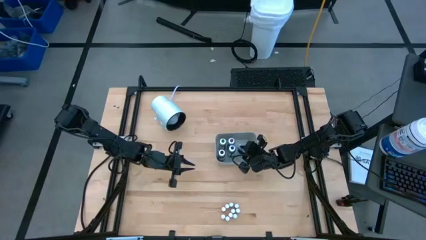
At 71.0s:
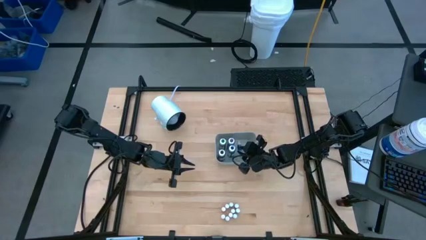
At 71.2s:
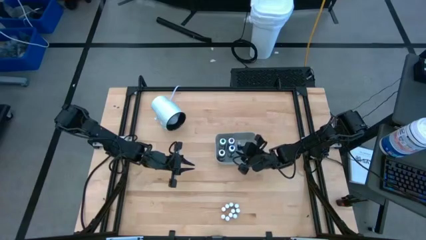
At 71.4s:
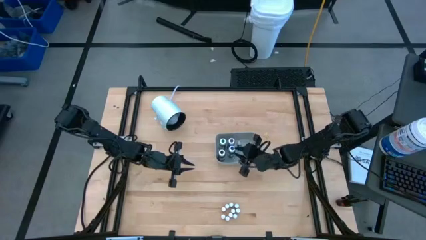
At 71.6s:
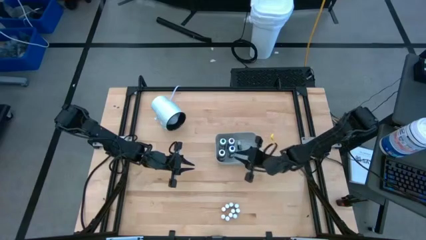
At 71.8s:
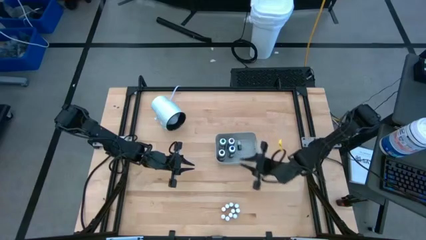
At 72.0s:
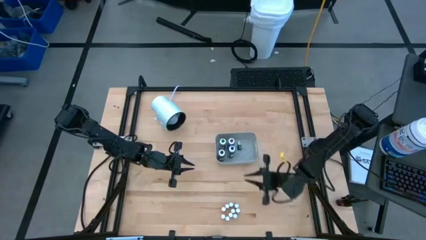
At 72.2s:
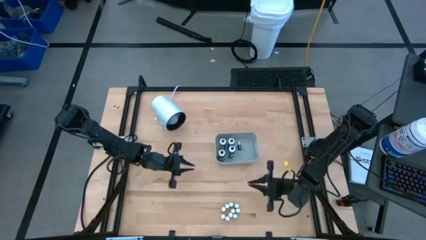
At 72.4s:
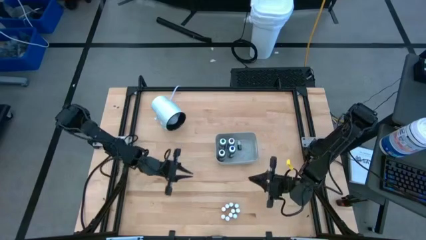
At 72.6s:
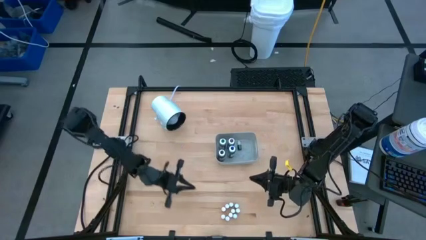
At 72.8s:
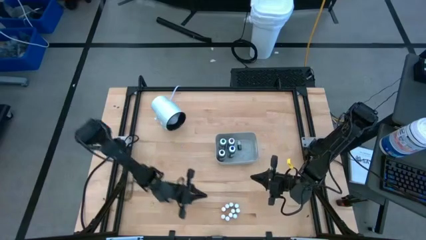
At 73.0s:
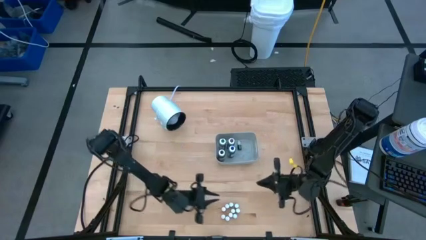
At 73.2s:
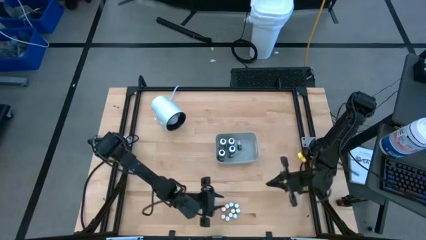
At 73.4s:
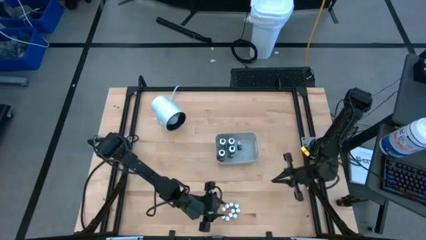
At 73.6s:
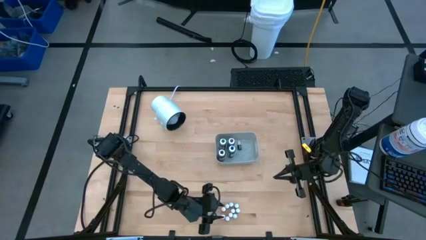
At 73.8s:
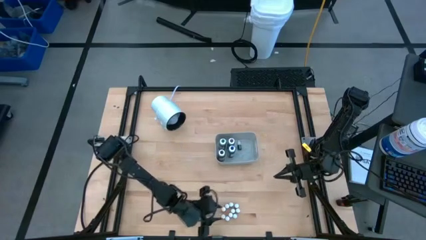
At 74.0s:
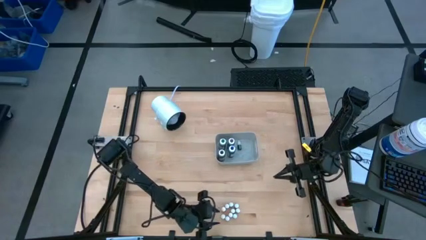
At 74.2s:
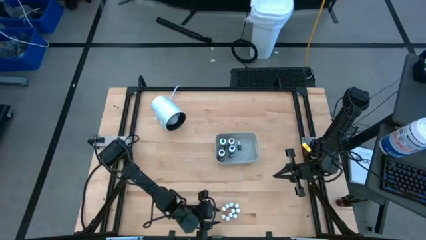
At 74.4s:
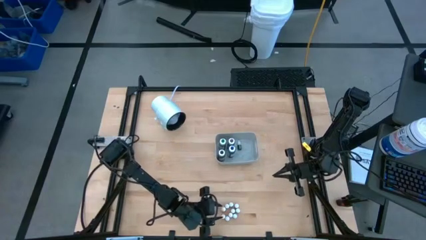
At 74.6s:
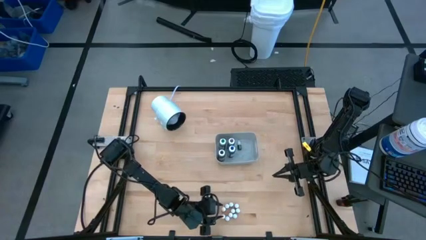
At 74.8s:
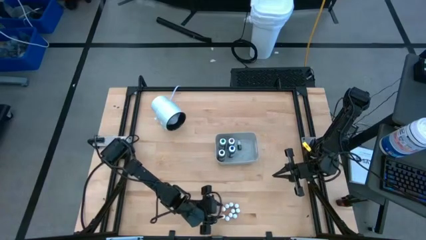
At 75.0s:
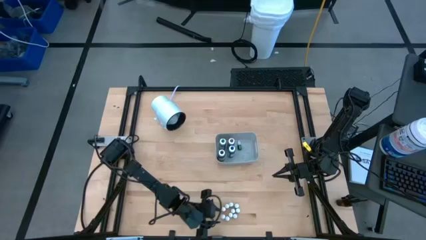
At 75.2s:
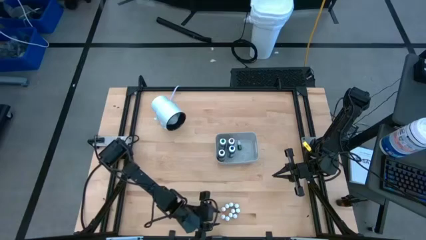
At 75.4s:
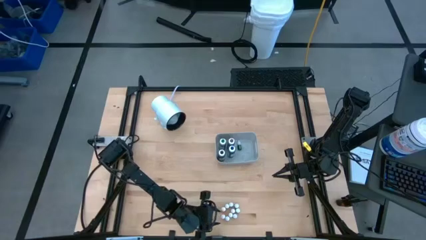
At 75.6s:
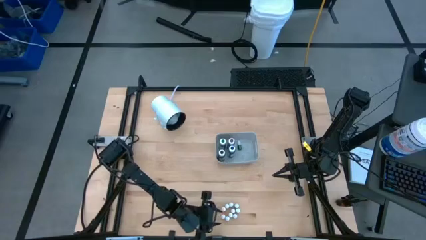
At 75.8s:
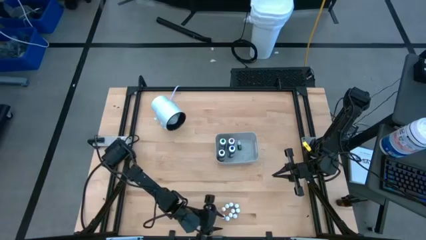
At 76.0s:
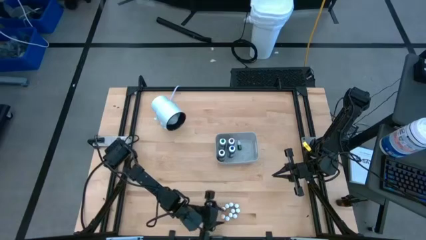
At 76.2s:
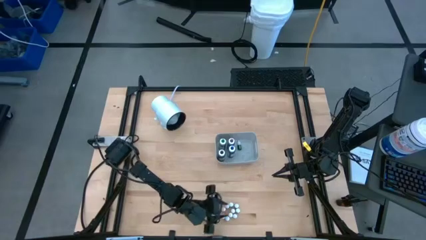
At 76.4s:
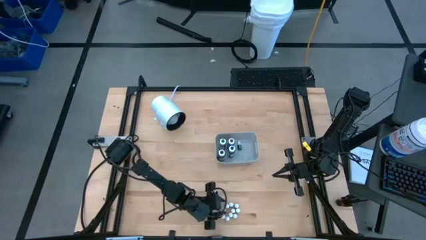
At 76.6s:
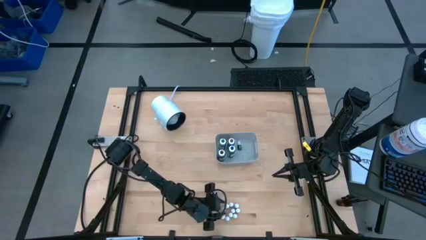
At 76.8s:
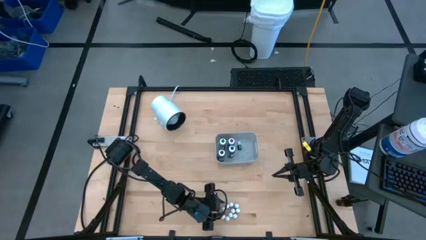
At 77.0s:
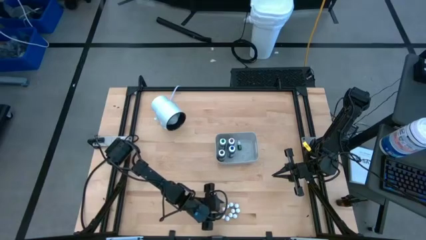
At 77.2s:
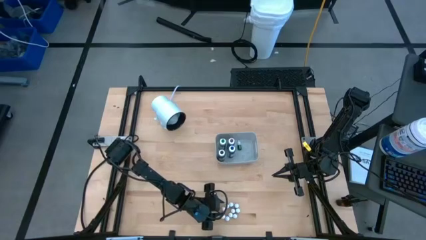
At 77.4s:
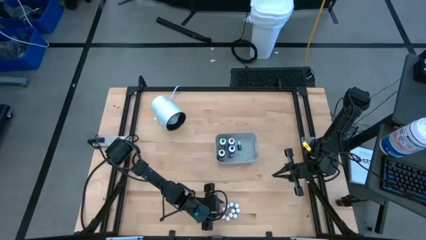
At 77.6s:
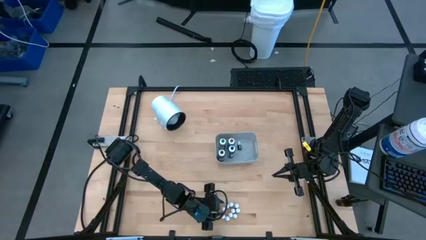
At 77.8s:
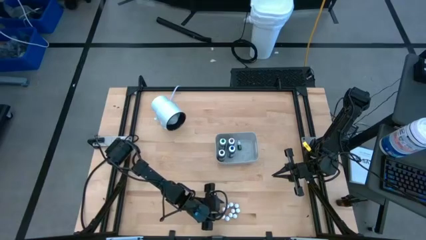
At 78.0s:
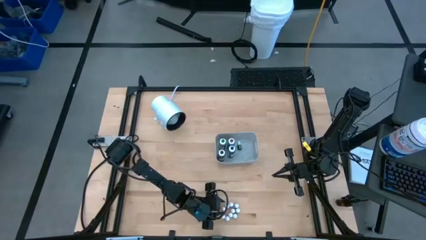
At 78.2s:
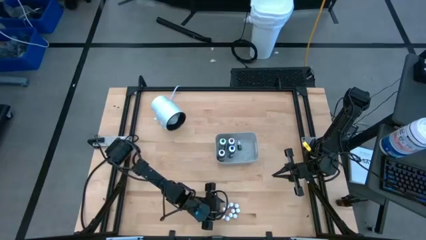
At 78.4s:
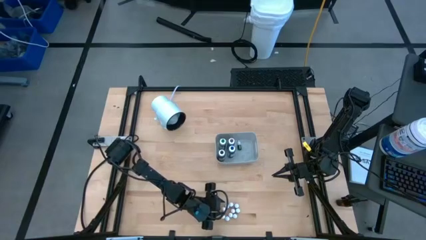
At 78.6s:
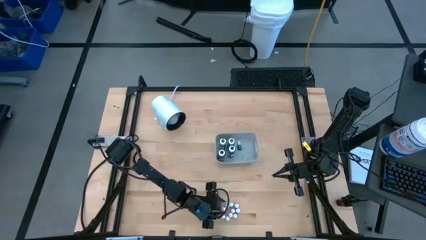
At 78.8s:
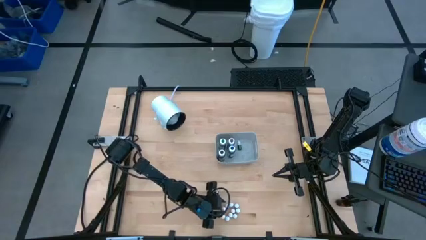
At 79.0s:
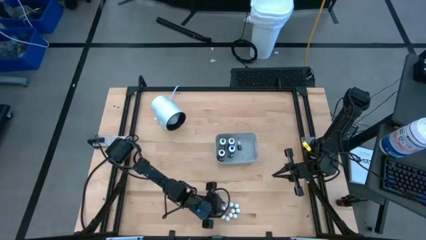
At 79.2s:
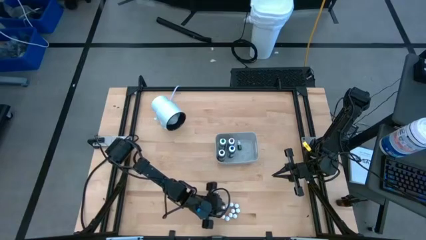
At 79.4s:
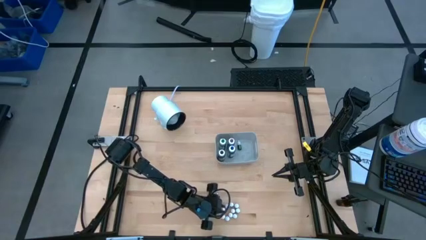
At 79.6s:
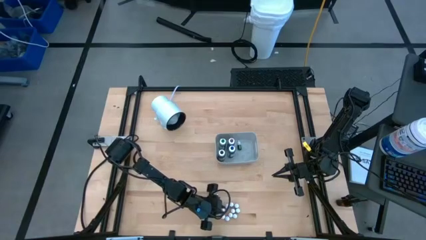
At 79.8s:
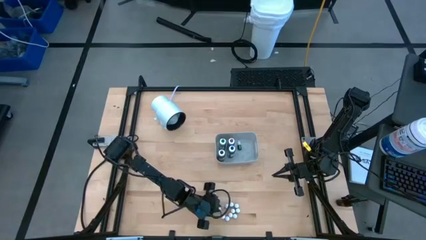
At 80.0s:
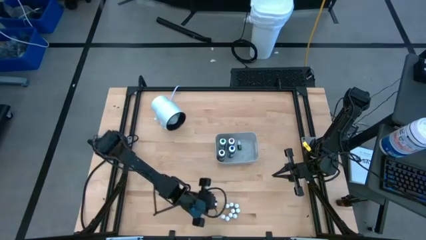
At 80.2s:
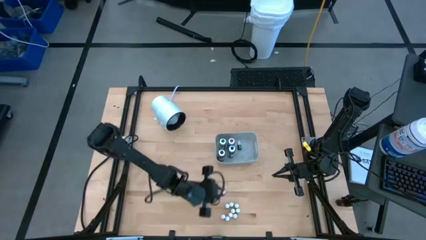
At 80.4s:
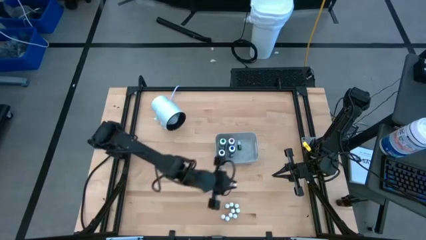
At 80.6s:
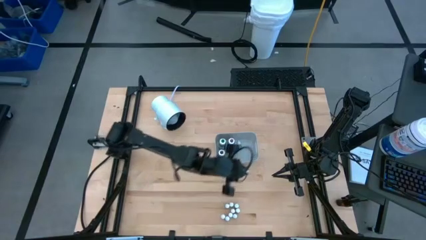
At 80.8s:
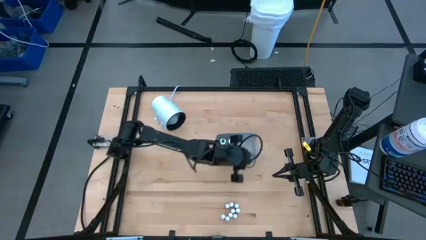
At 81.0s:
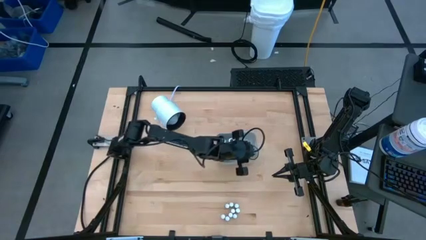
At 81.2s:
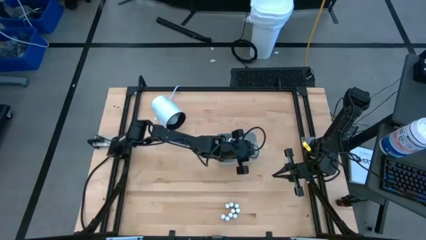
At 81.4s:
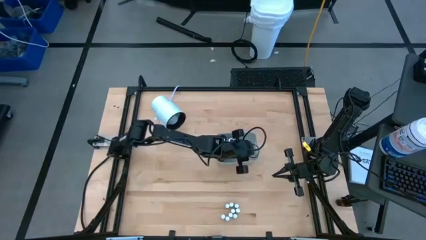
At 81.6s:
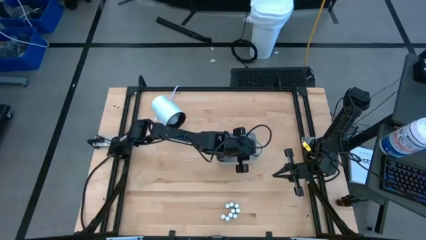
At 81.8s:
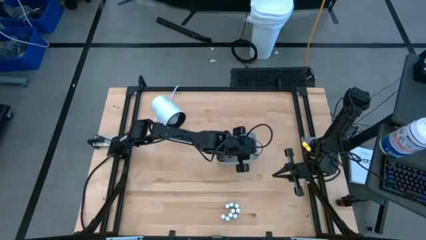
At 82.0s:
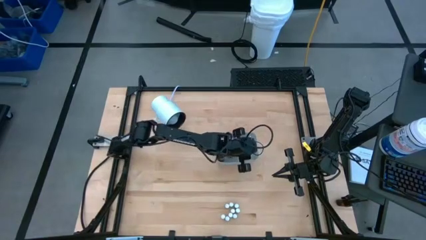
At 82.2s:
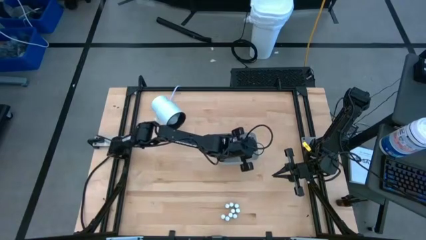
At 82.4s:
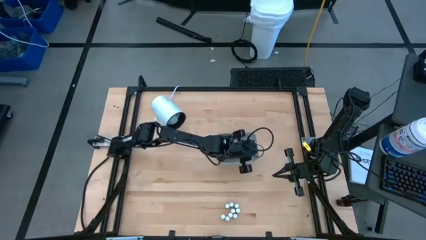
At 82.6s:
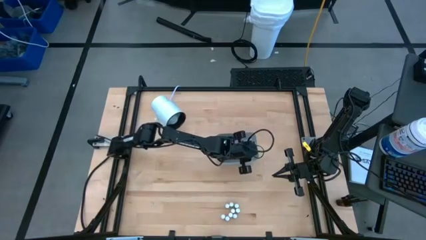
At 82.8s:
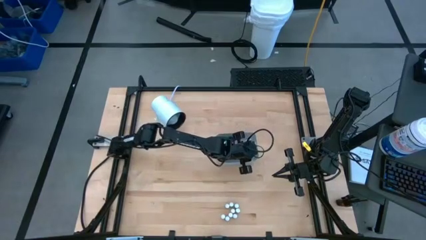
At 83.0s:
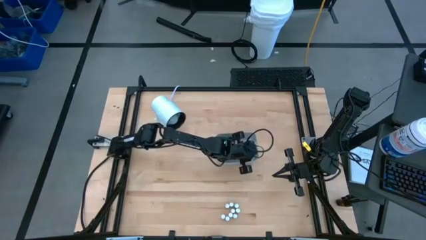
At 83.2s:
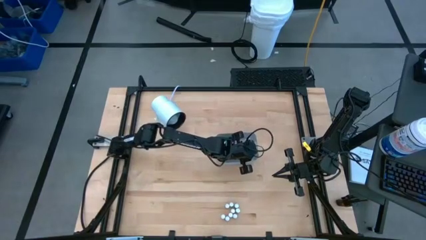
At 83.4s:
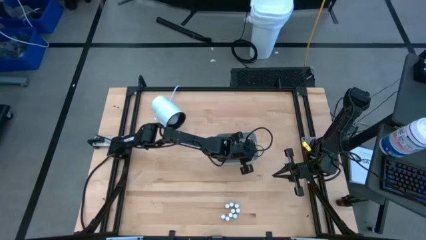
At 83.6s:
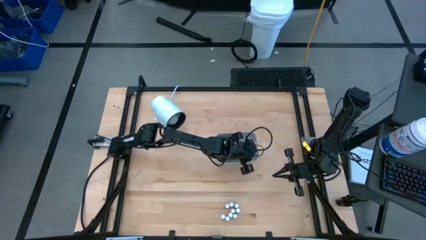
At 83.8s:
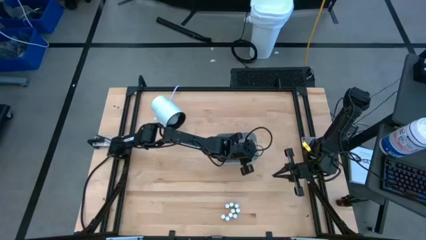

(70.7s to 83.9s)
Task: Pick & Place food coloring
Put the small yellow food coloring bottle into the gray bin

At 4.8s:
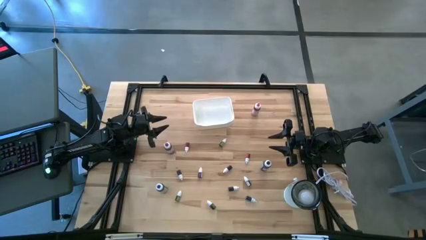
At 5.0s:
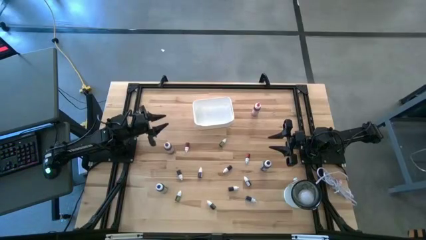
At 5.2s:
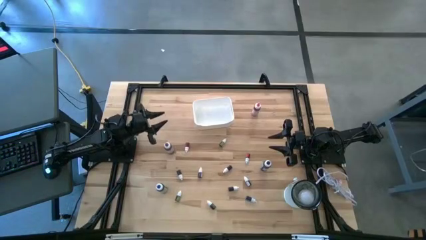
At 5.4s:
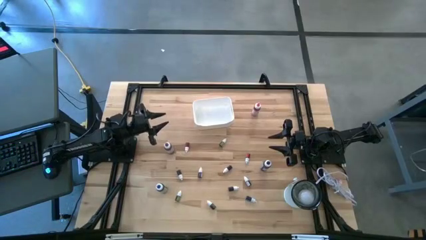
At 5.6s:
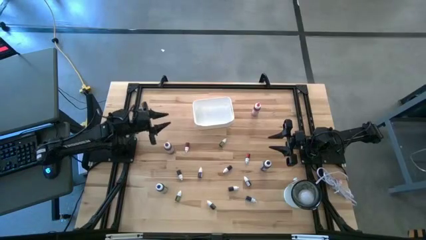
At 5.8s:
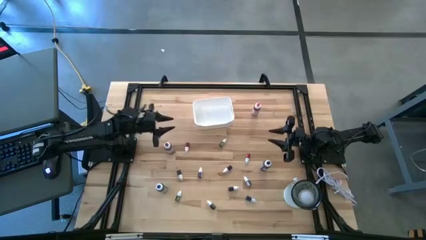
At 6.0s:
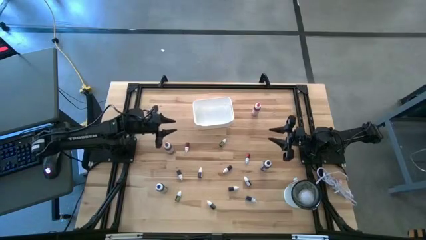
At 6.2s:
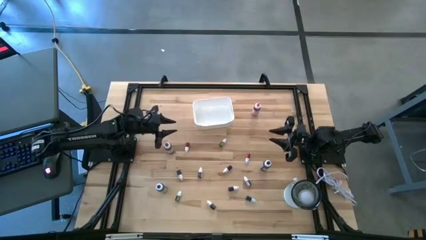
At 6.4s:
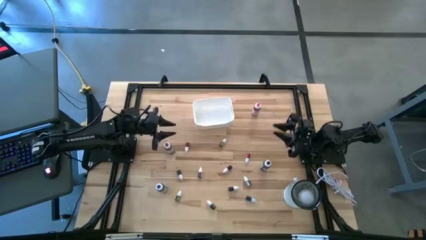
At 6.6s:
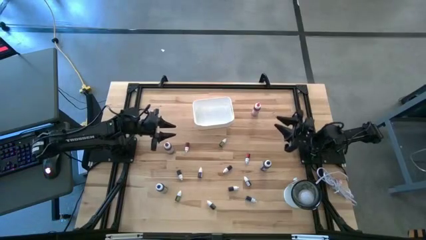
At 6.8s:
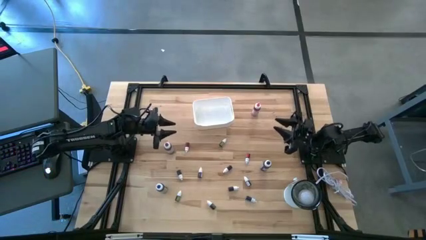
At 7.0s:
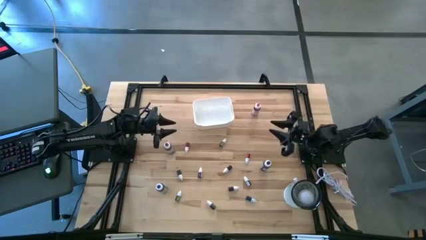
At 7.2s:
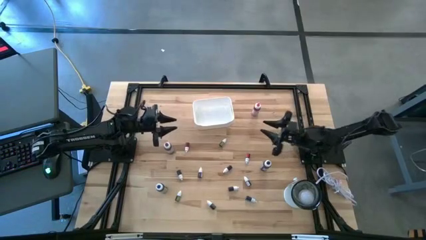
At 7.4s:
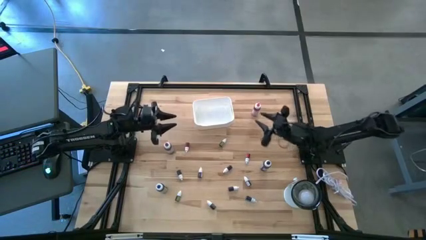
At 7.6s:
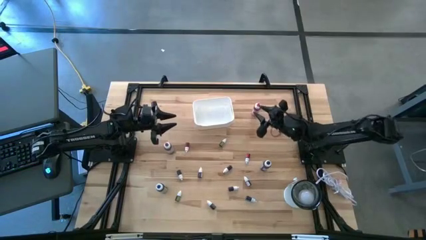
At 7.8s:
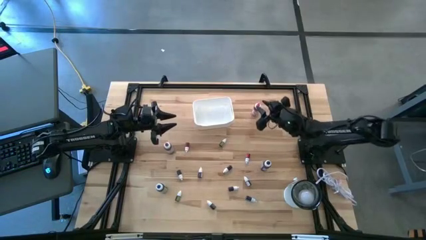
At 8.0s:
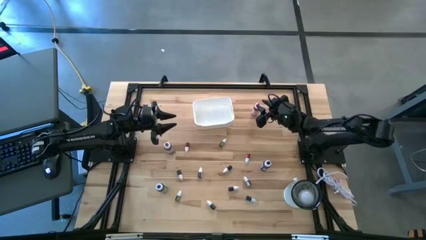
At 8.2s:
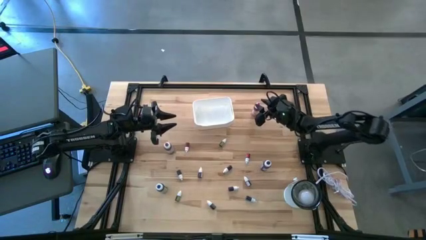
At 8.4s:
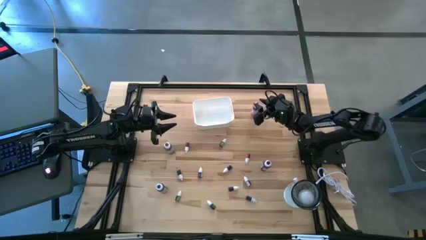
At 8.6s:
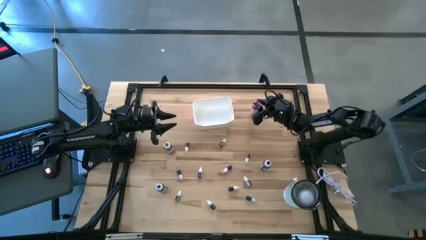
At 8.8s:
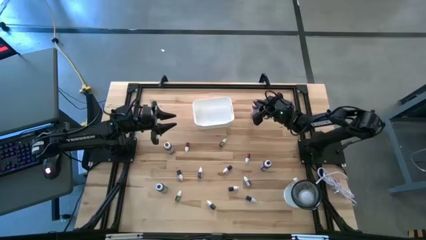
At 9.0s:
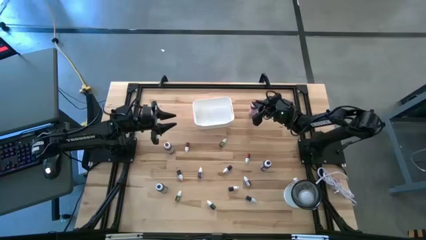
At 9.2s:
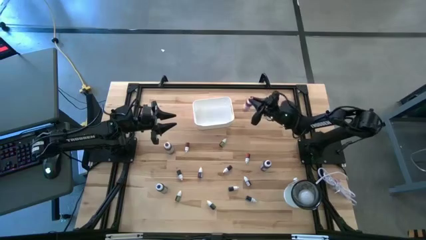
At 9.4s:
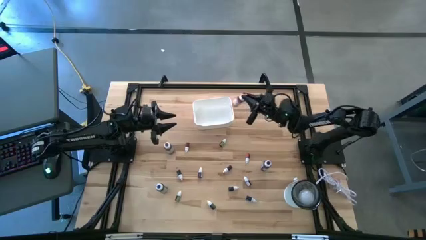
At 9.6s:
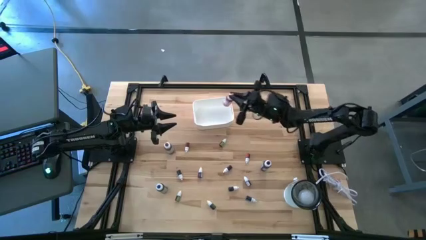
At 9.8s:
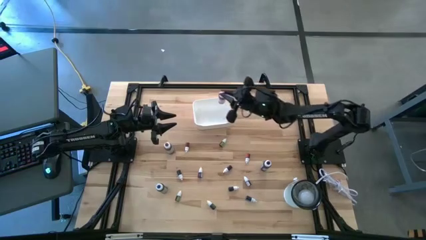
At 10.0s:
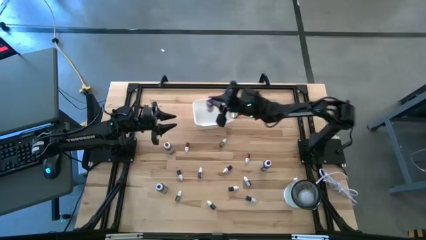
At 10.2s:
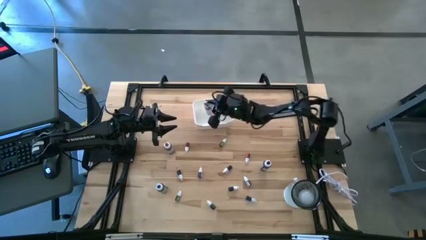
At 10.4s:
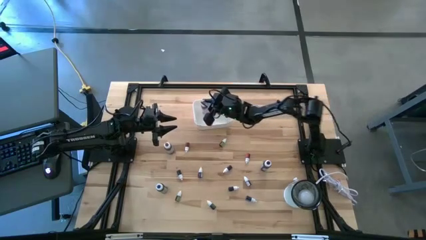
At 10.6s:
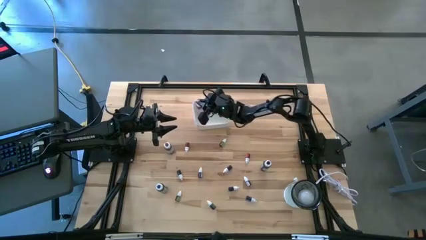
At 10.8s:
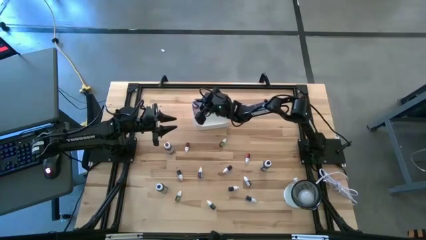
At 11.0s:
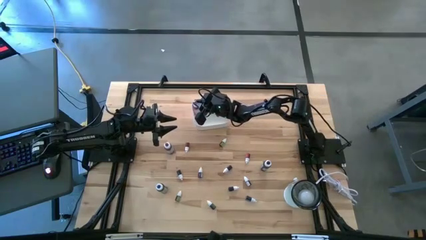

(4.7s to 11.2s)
Task: Pick & Place food coloring
Put the large pink food coloring bottle into the white bin
